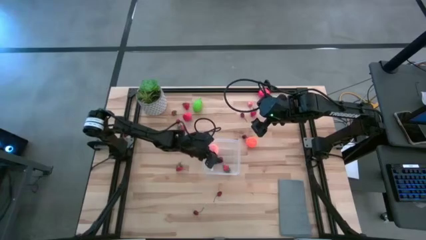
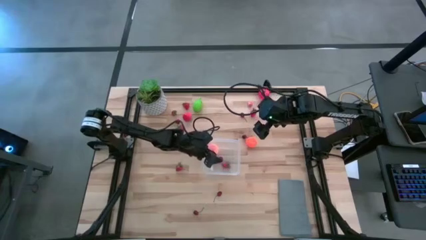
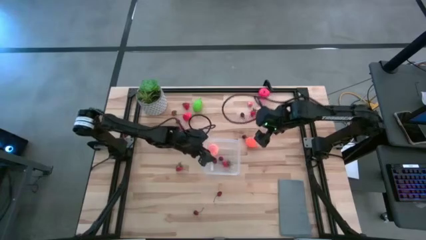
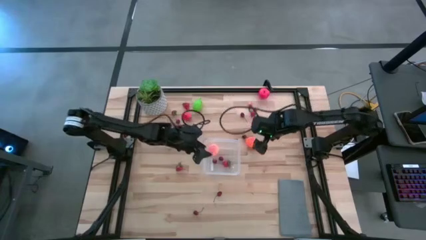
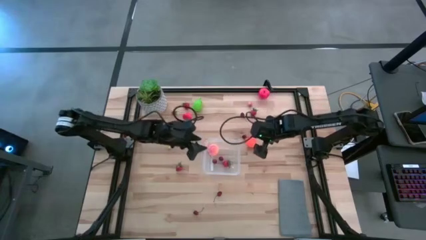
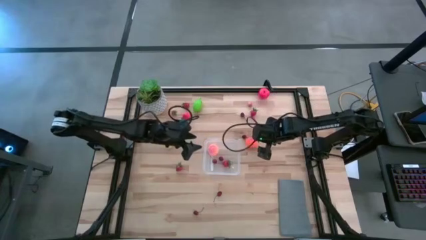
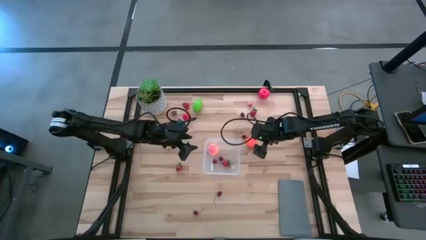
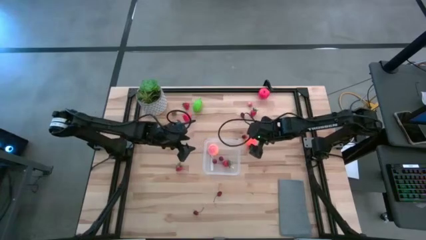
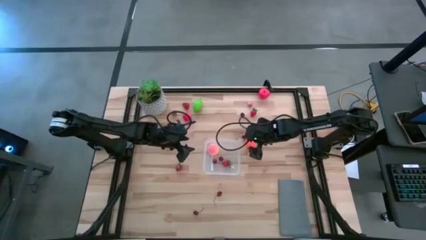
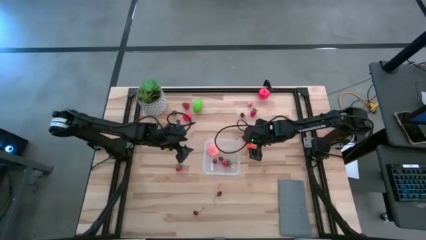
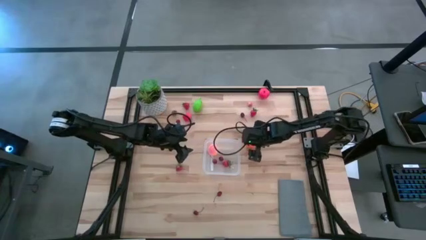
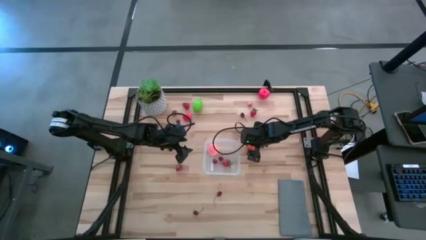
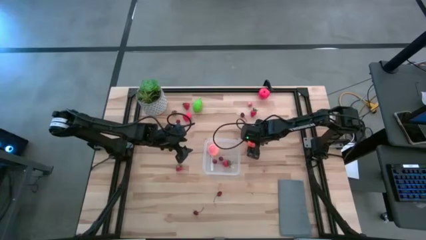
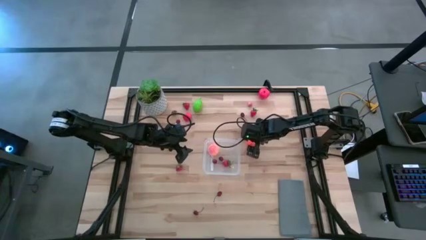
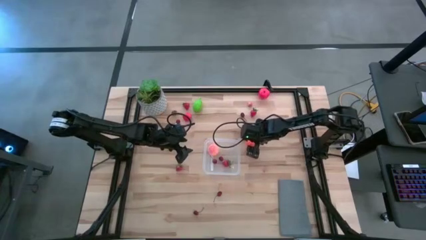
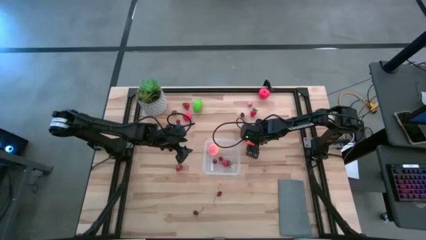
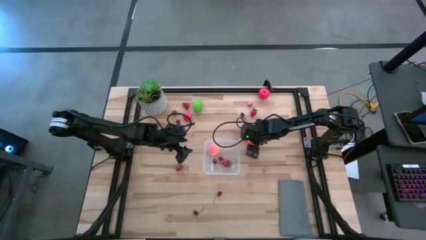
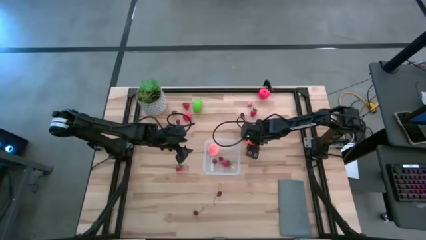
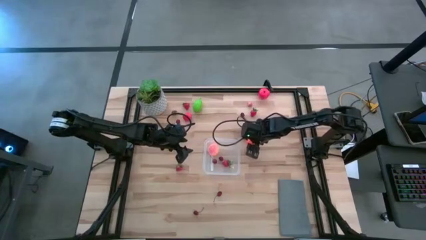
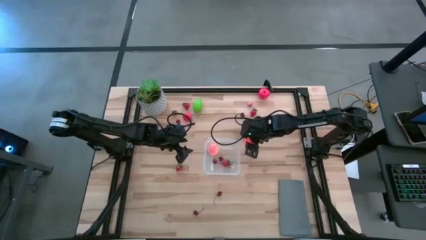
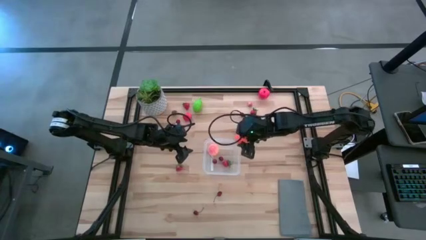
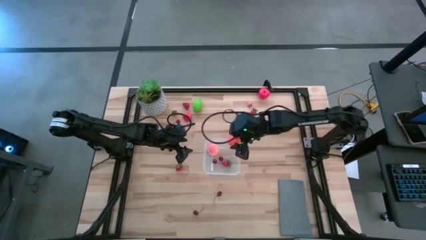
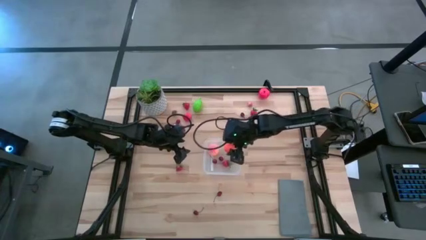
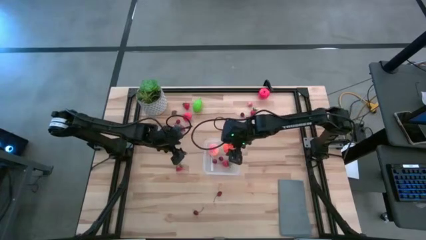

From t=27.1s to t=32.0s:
Task: Pick and placing Produce into tupperware
Put the orange pumpkin into the transparent container

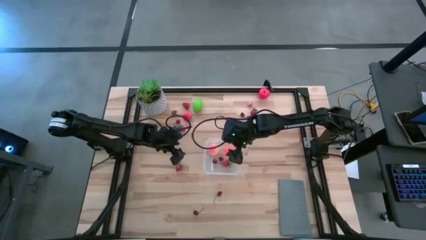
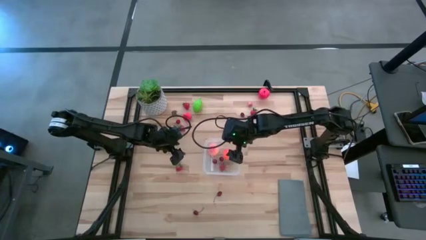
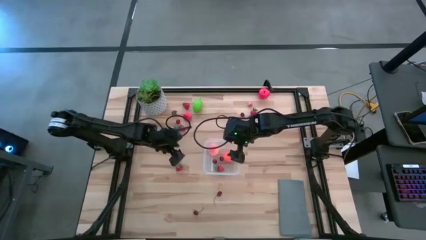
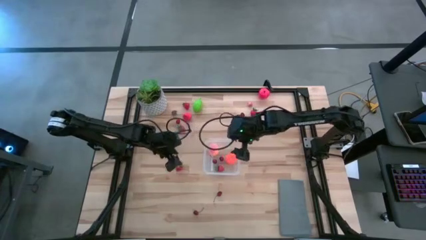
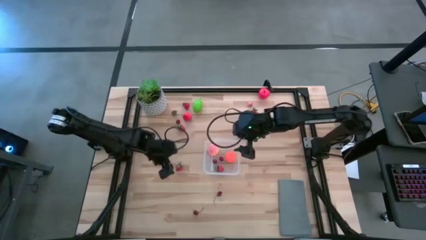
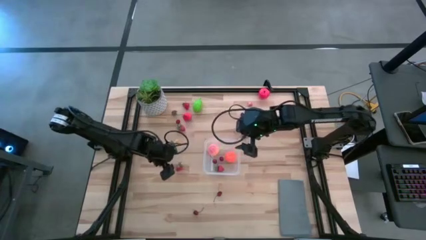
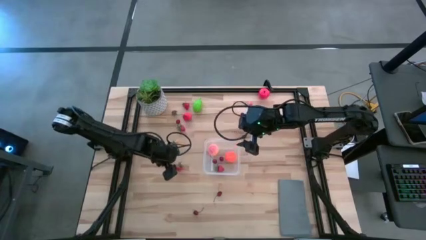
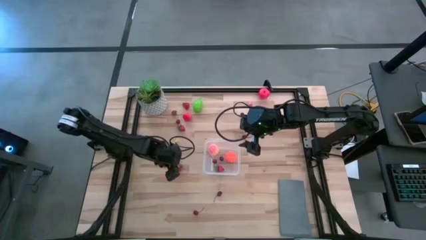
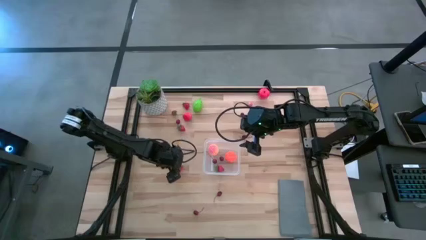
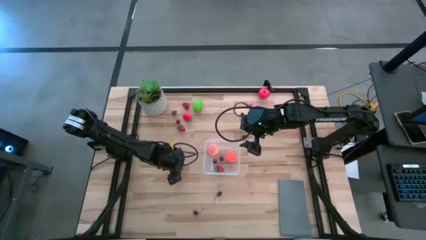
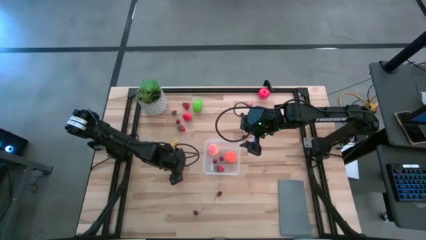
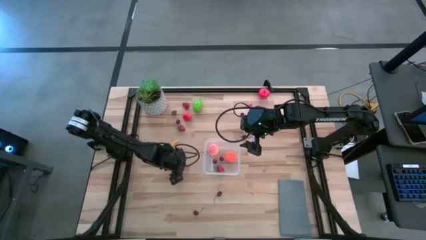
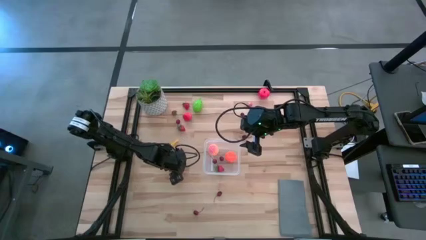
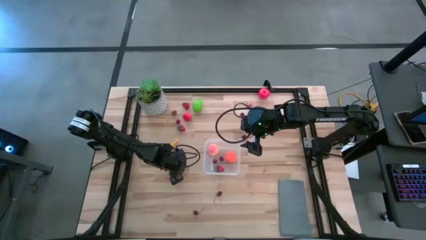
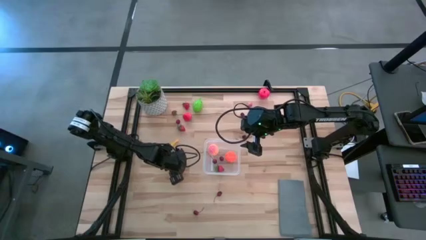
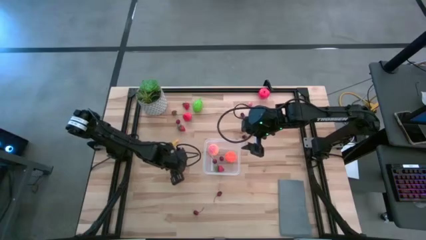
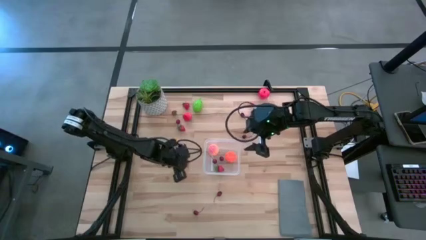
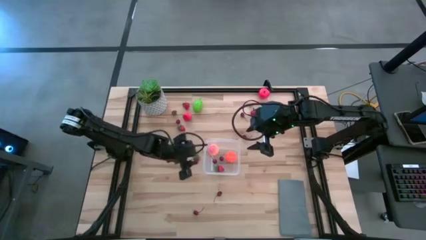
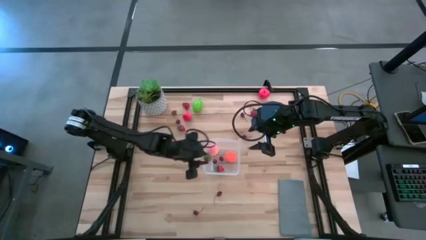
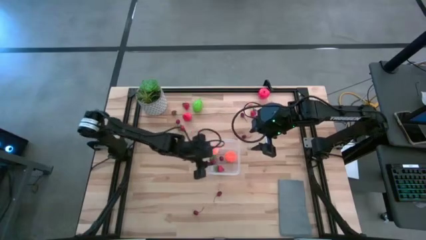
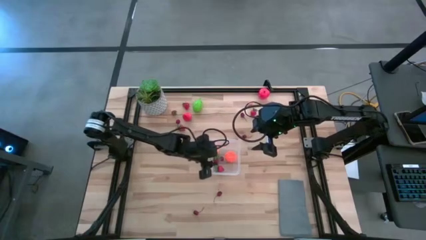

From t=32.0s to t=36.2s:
Put the red strawberry into the transparent container

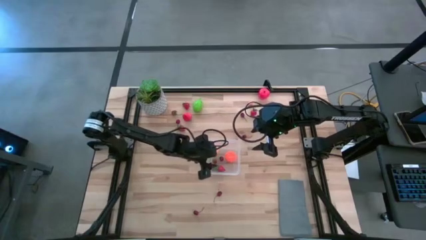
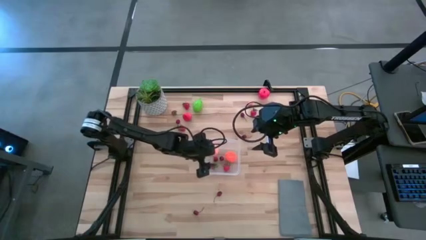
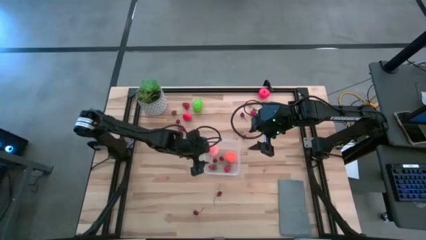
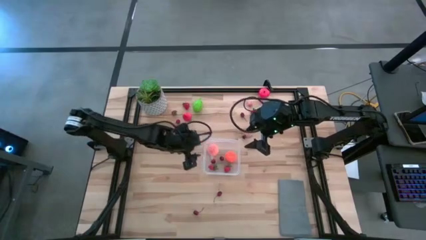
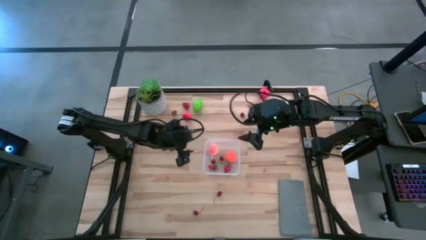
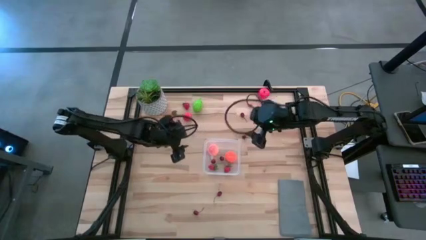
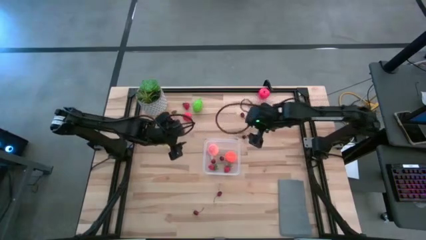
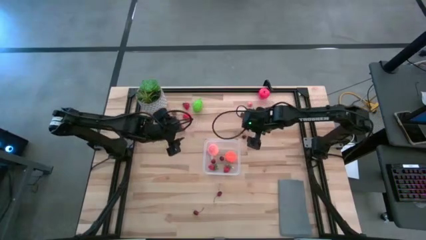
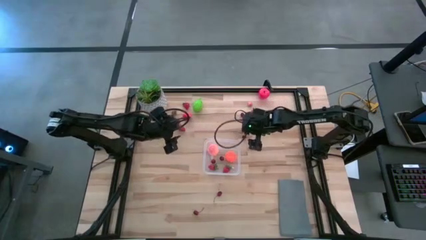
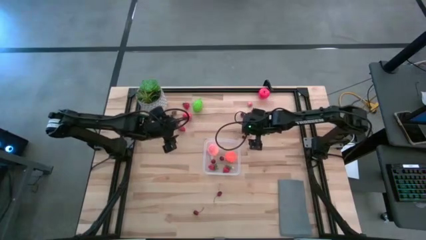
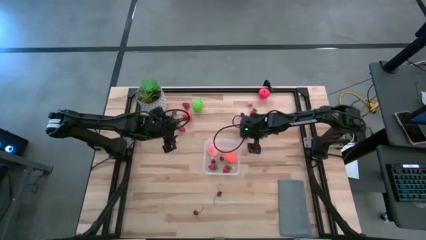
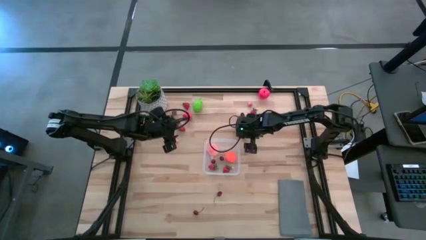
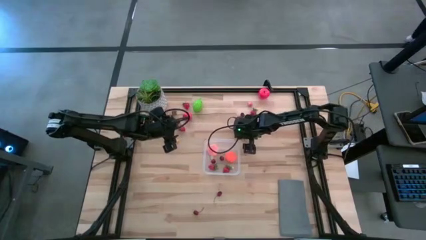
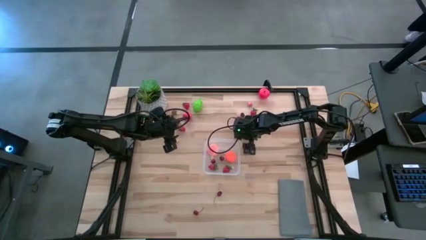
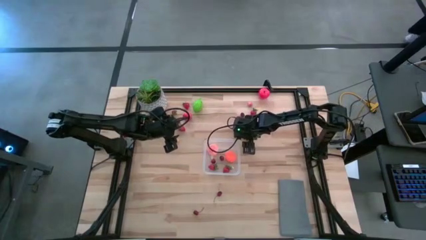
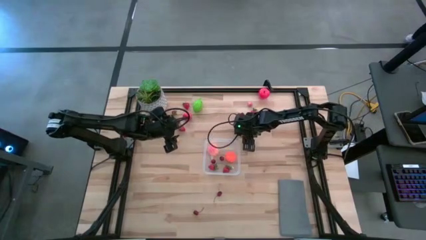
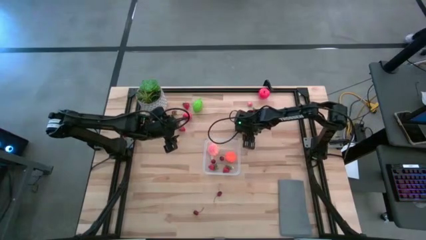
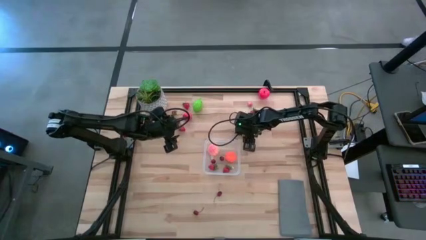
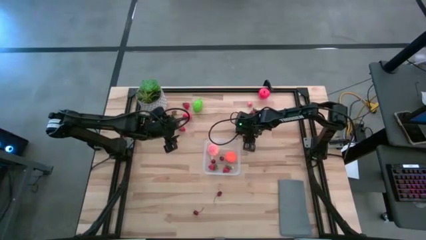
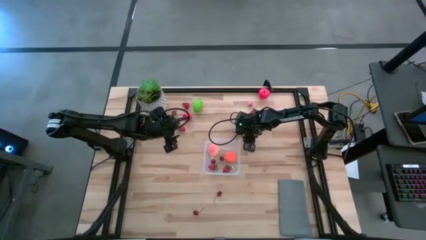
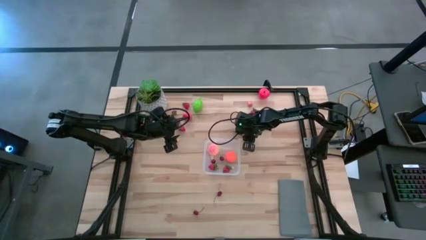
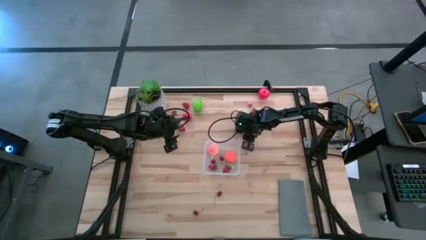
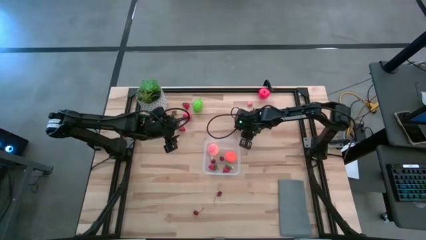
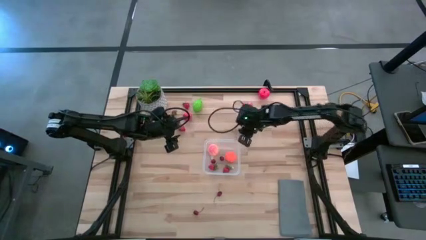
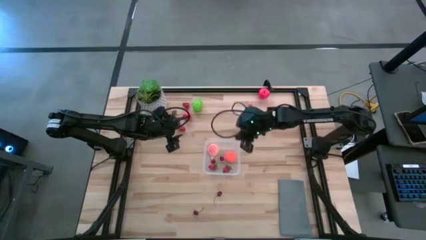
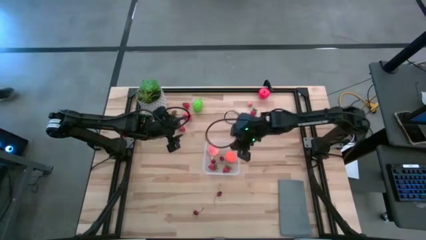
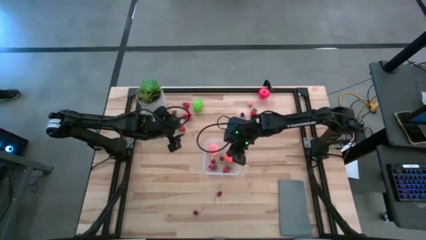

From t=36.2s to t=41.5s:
Put the red cherry into the transparent container

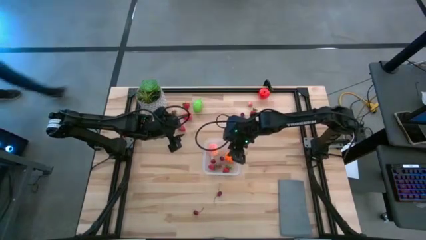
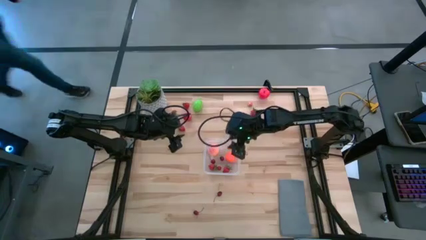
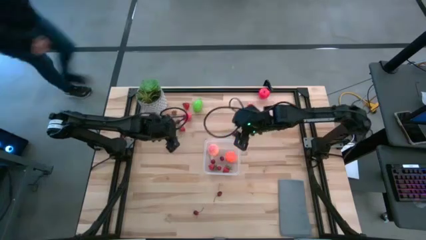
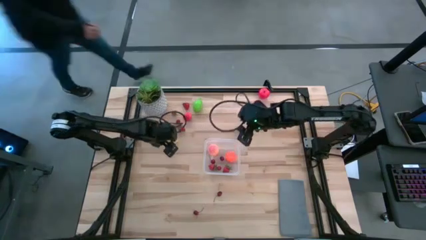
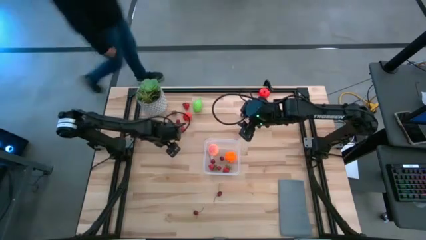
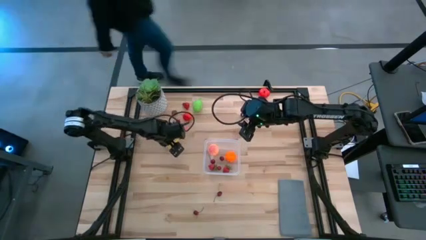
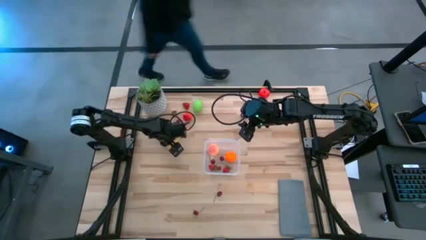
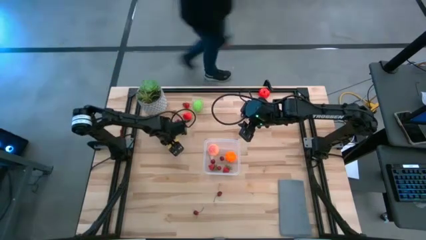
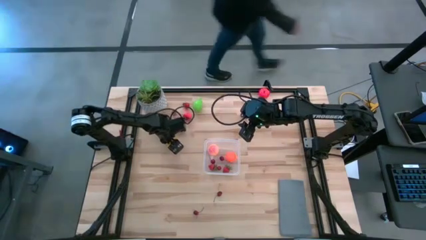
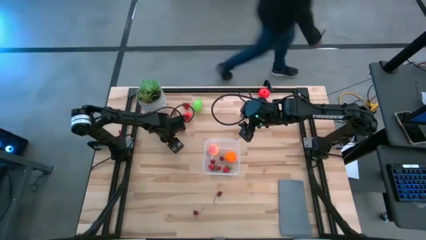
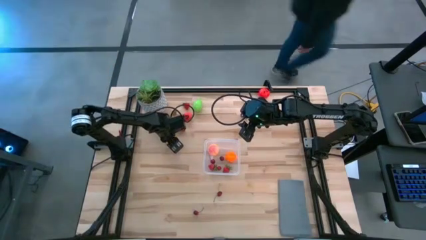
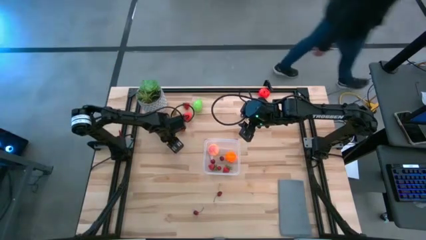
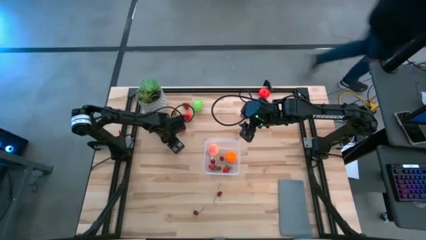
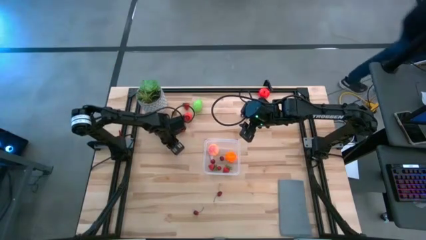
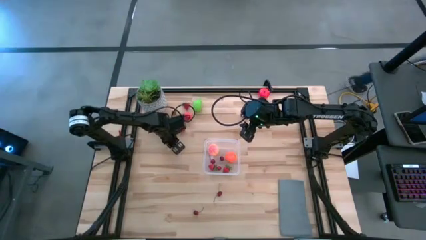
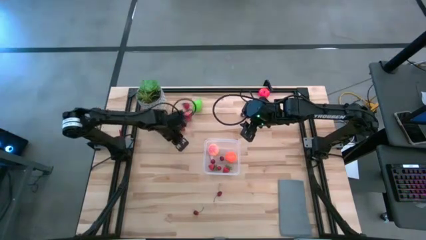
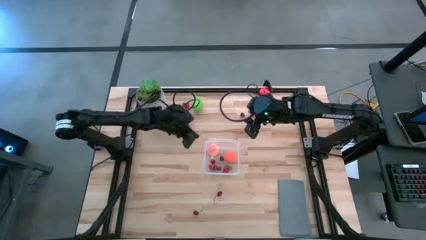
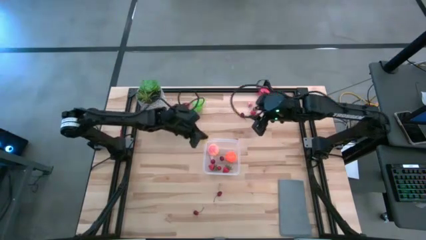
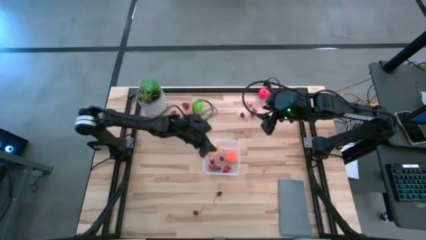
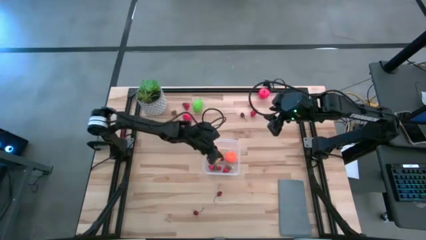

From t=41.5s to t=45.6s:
Put the yellow corn into the transparent container
